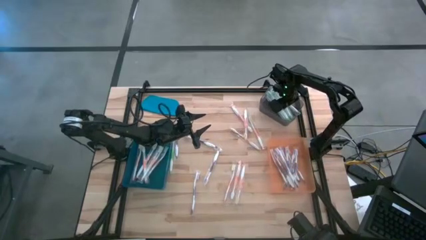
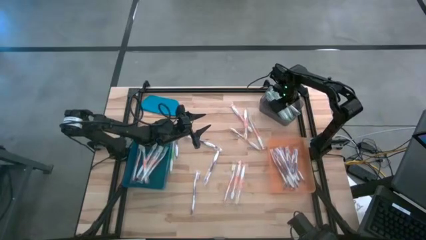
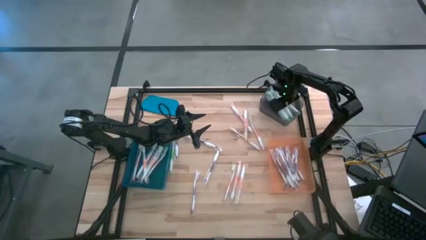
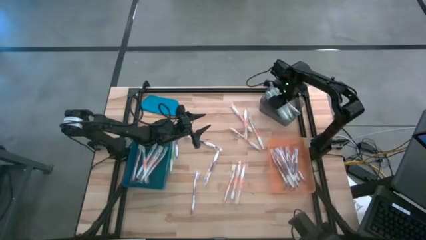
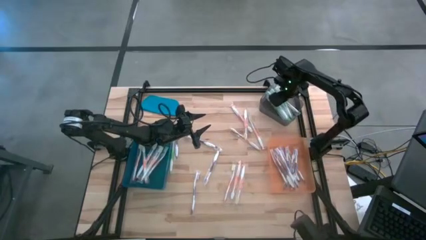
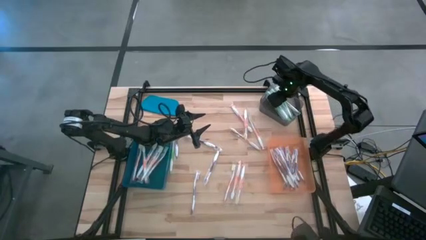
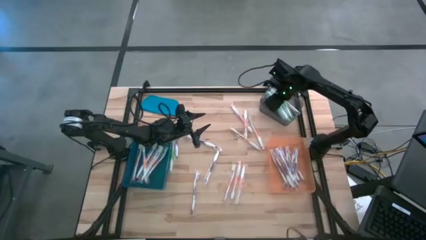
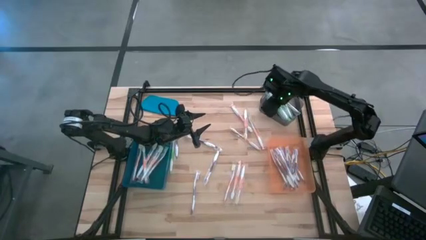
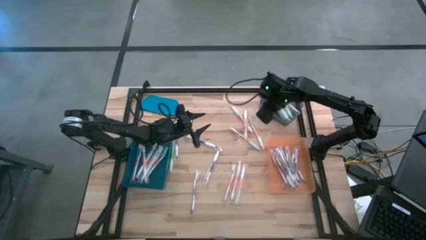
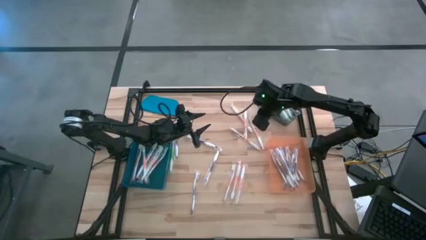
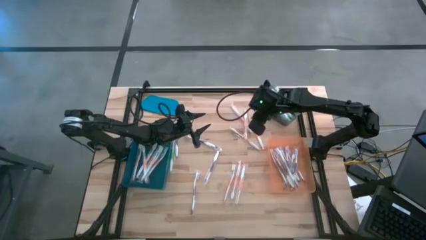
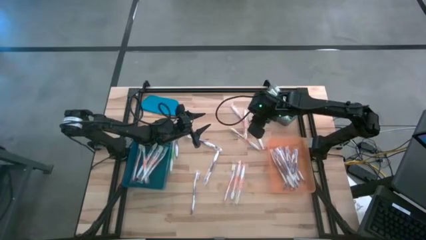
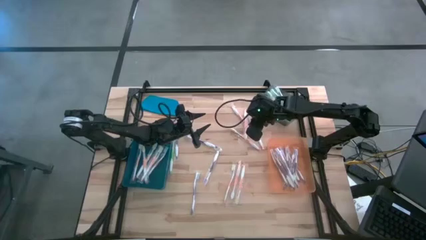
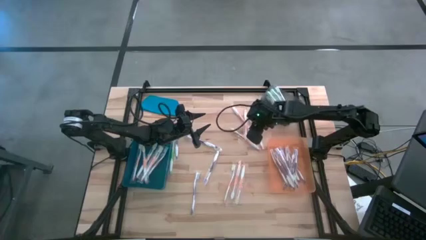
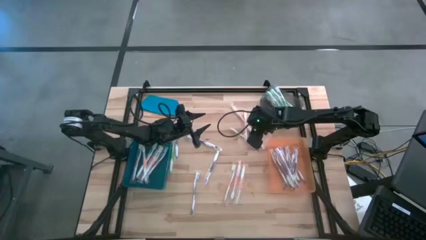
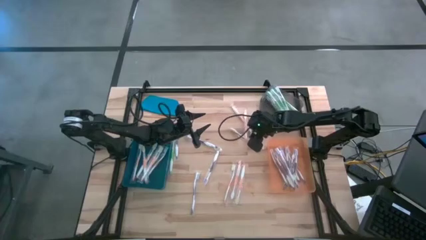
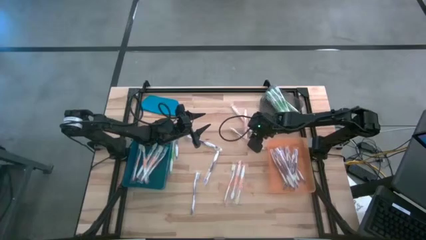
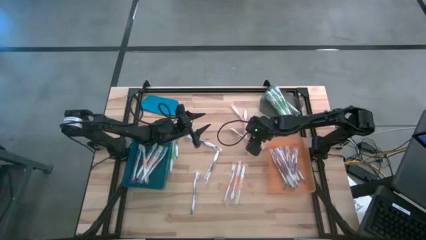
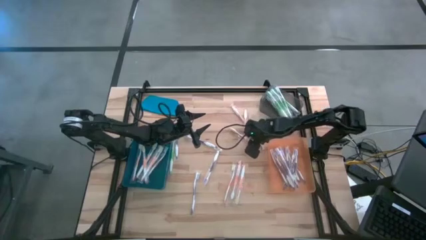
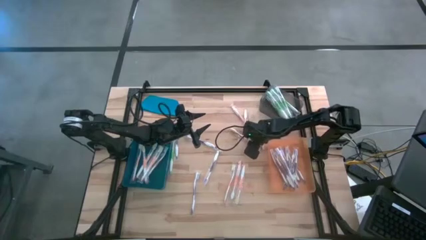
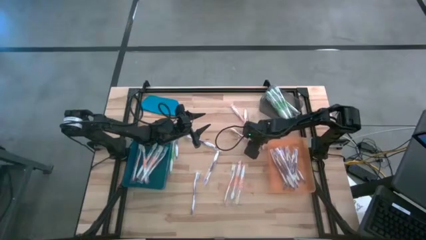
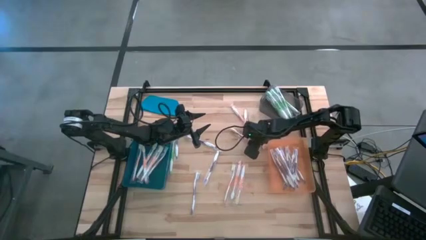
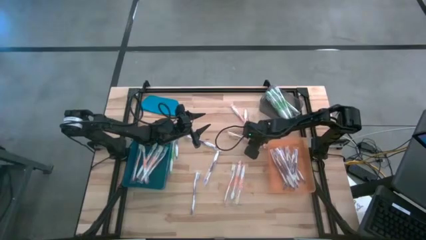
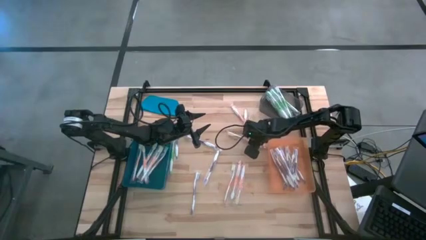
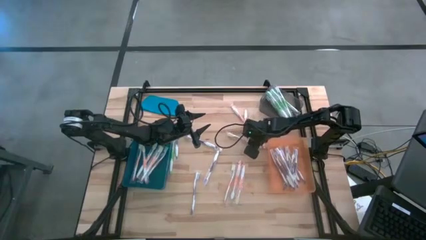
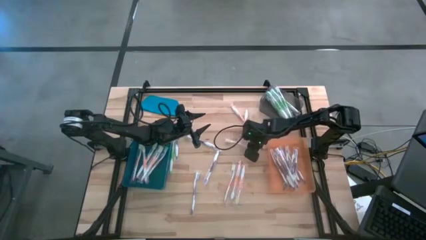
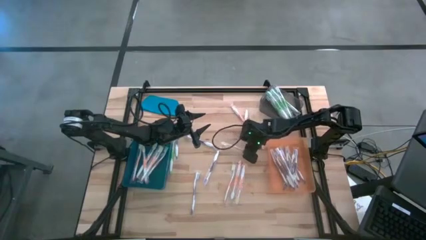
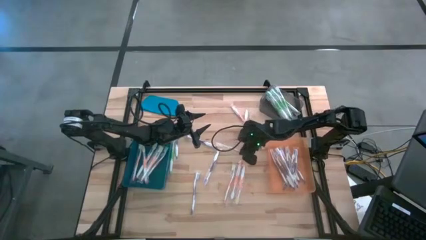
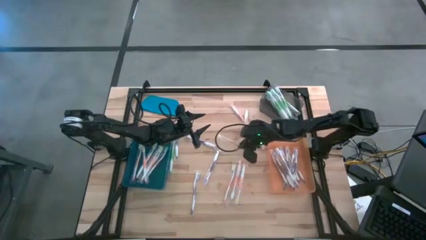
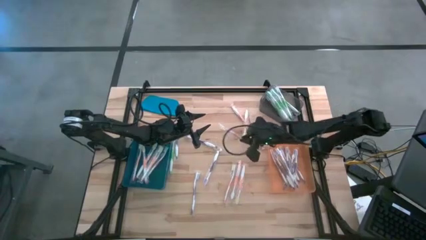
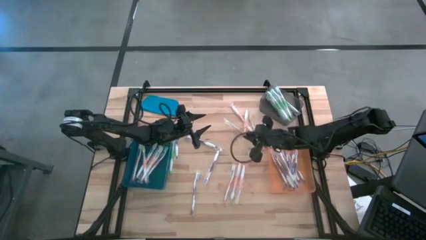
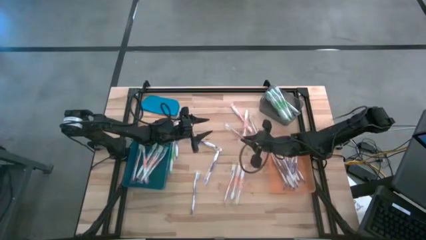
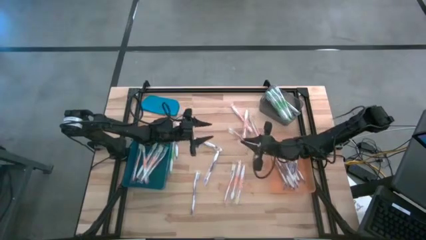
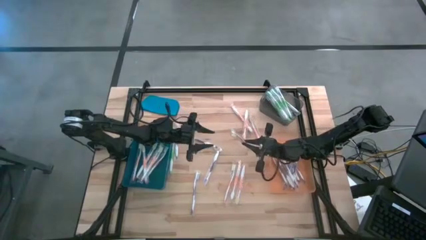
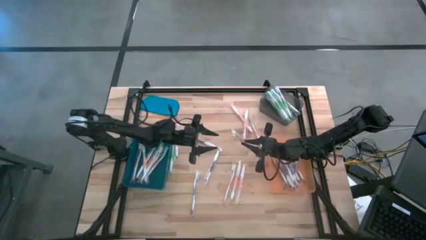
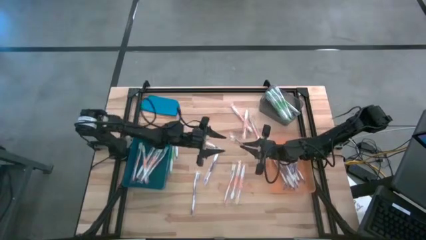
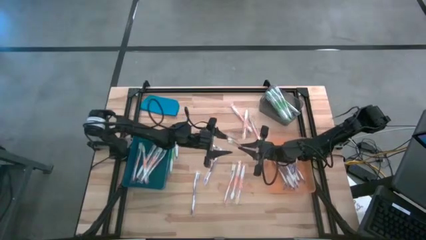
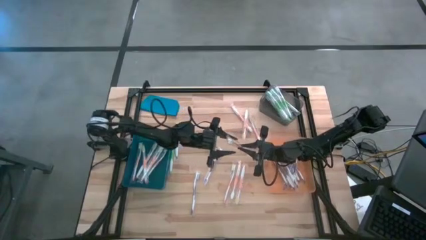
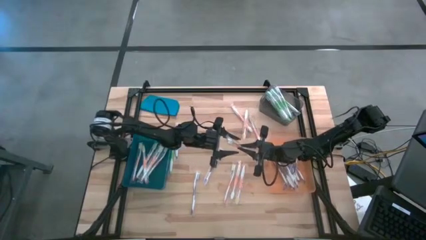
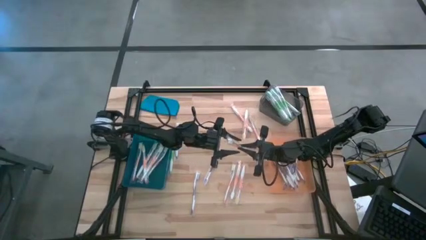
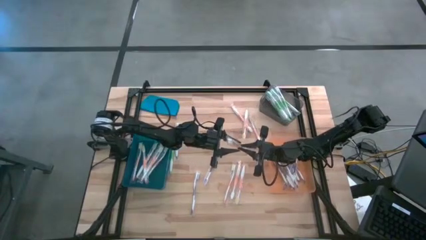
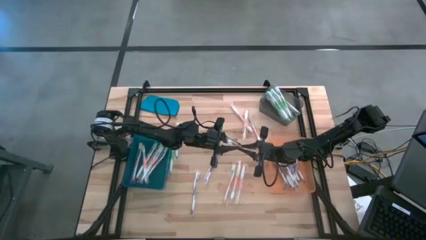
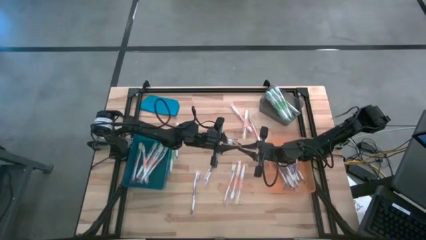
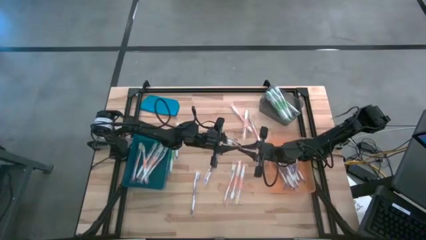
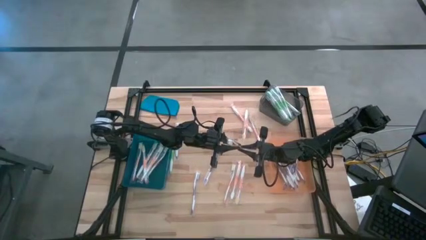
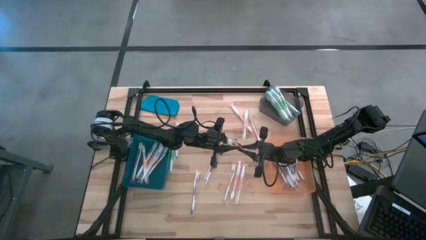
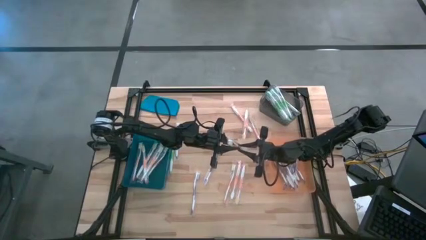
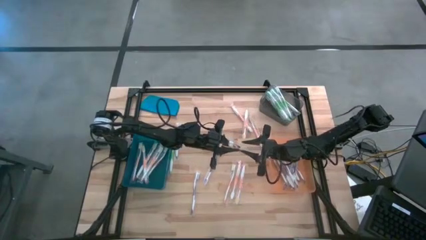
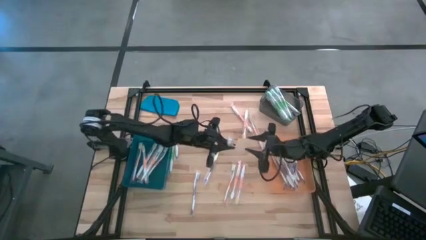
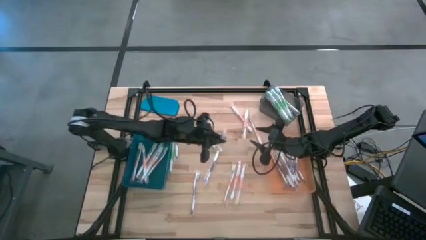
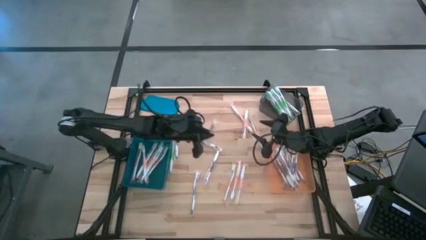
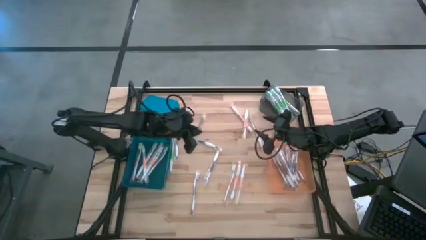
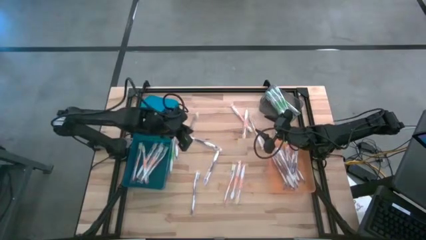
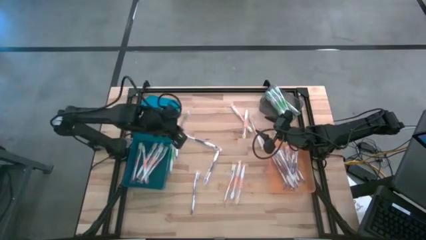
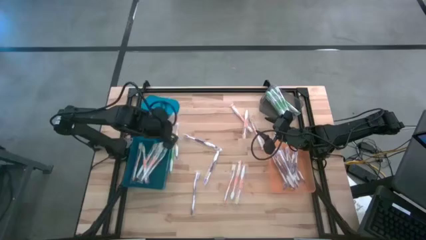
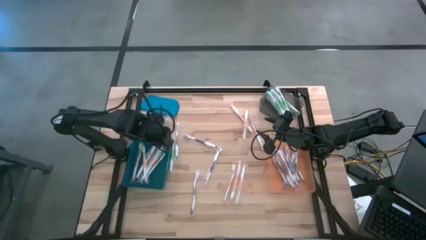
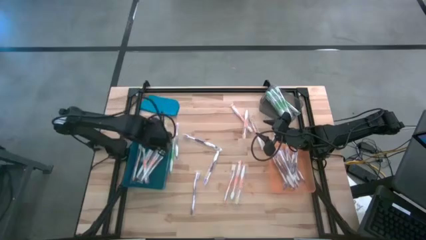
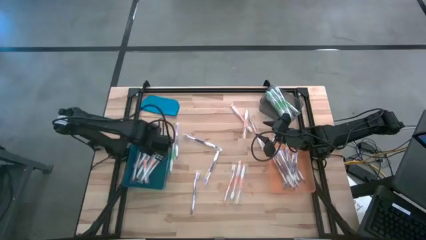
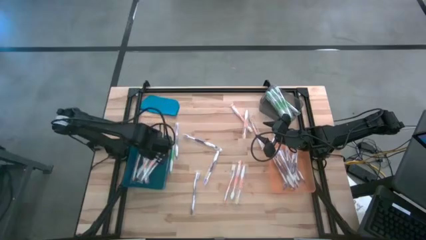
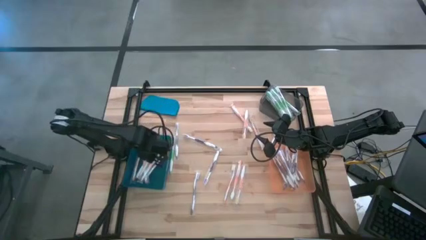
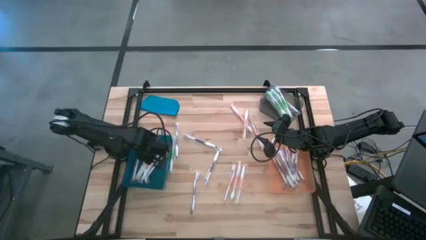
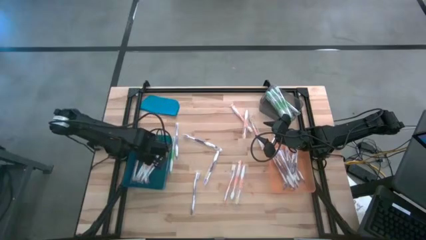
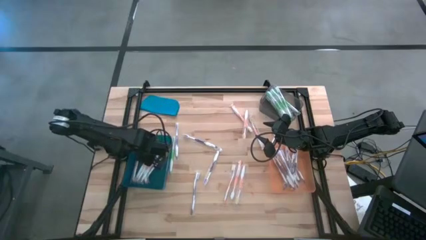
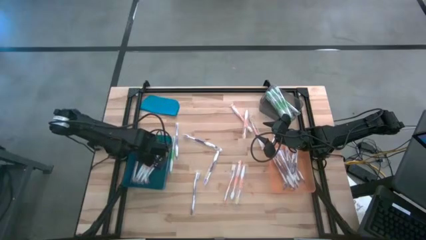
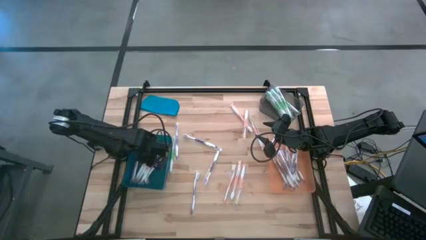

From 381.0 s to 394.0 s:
Task: Pick & Place Toothbrushes
Put the orange toothbrush into the blue bin
